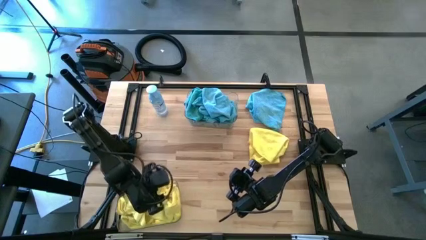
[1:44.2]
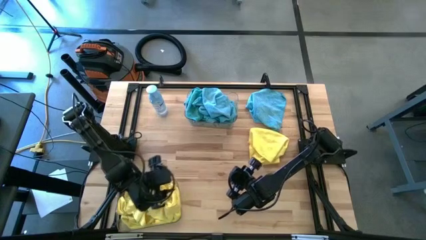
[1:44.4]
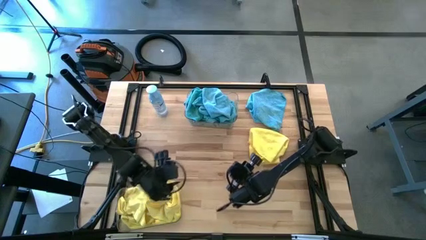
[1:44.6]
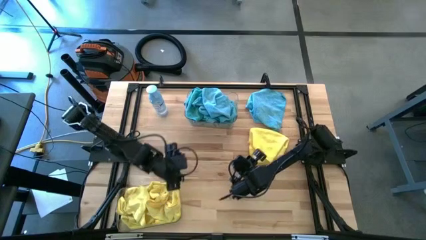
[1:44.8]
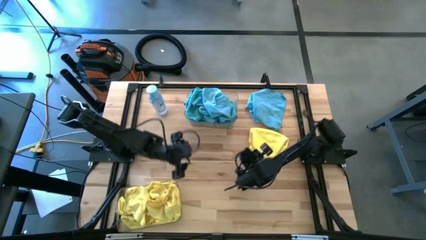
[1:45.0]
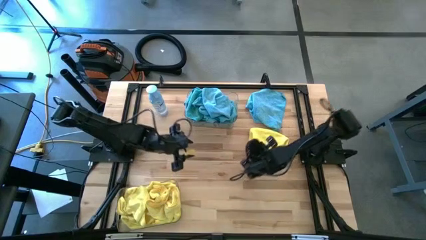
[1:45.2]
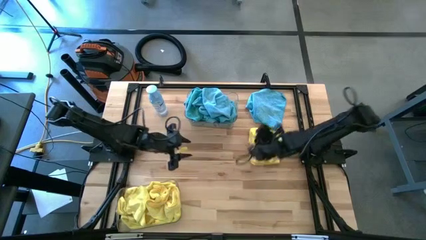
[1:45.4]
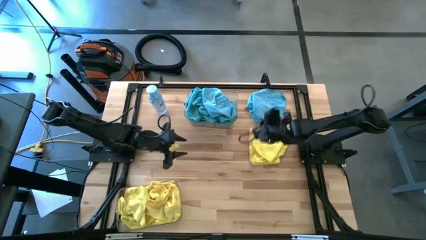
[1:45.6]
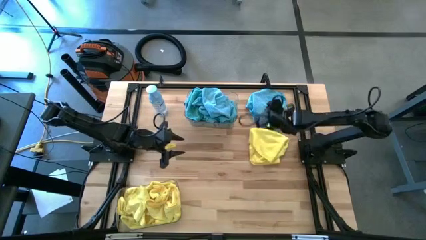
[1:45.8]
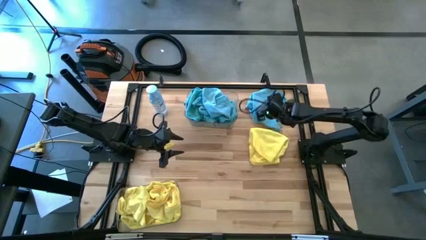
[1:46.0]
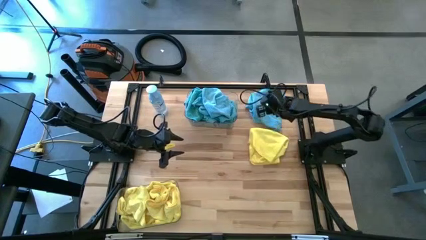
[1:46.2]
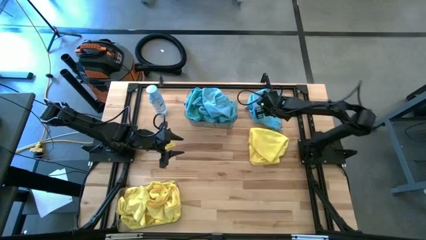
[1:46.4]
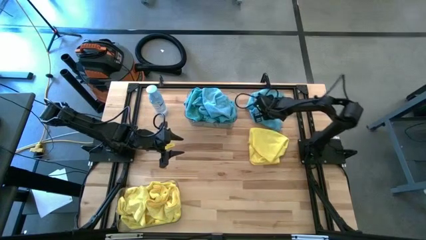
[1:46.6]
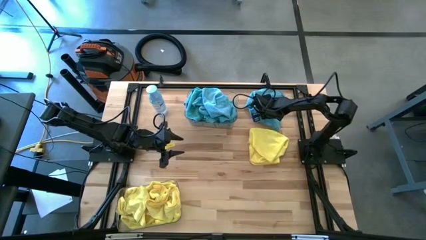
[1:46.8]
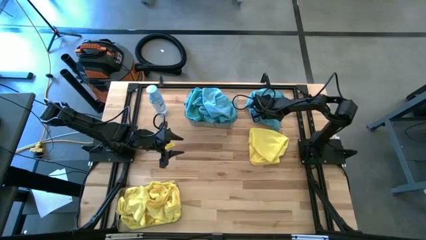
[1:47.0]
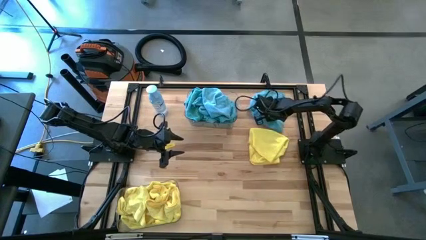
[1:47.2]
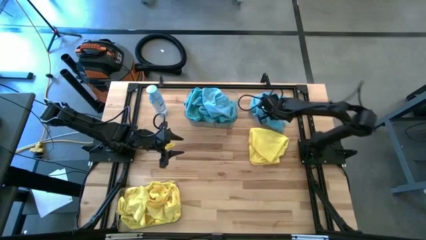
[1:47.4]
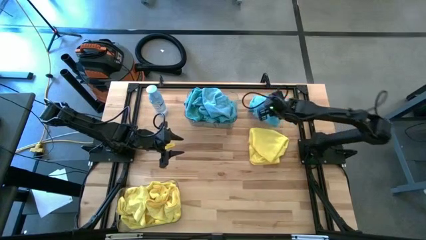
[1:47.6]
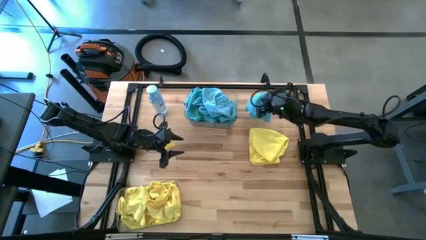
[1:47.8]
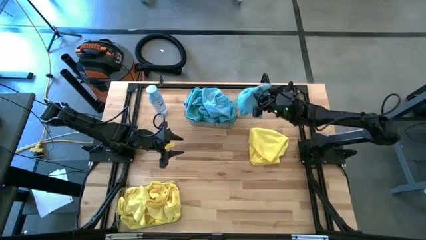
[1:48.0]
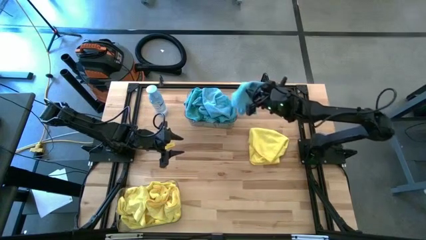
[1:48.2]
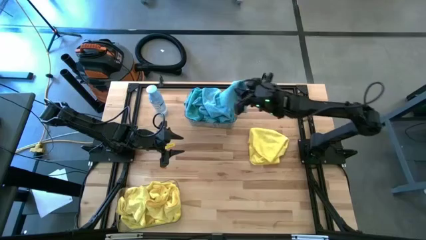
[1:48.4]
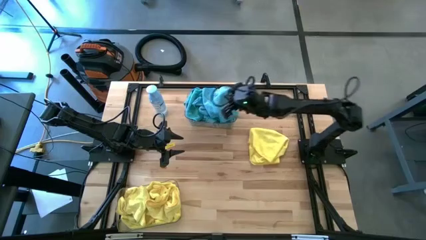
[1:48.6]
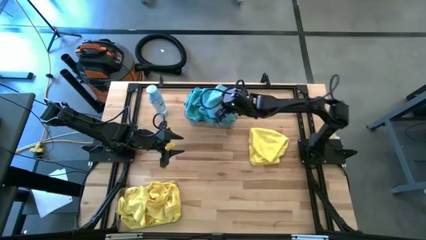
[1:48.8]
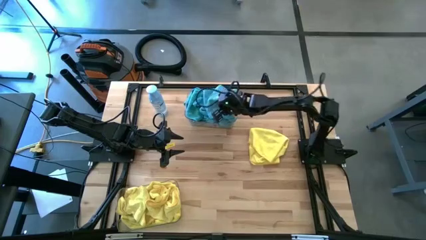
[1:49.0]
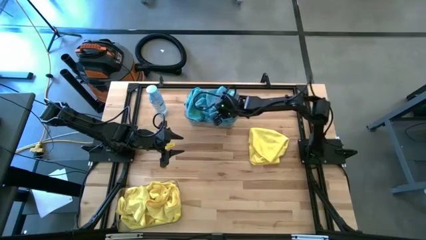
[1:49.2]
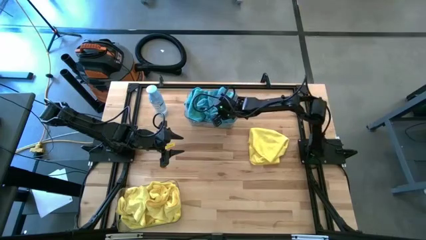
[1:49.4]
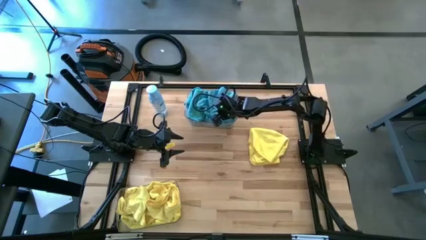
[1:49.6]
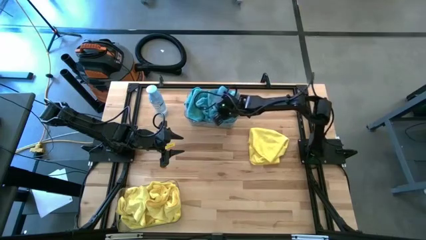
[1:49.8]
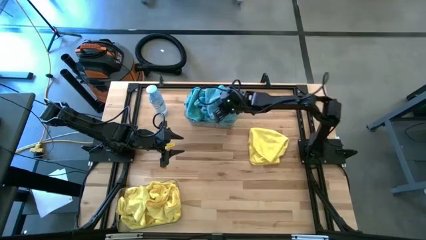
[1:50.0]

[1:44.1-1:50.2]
Task: Sort microfiber towel by color & place in baskets
Put the blue microfiber towel into the top transparent bin

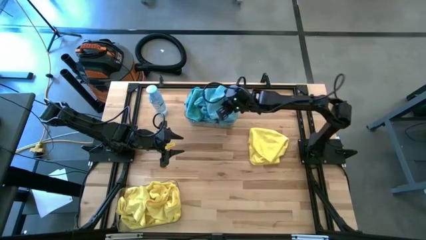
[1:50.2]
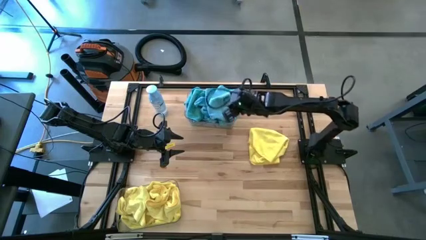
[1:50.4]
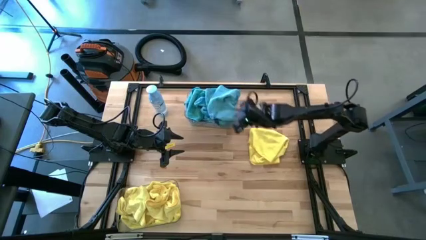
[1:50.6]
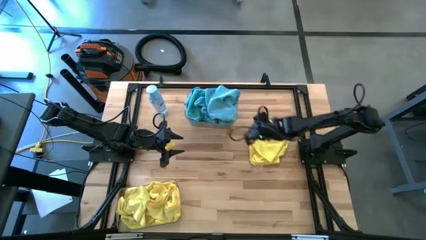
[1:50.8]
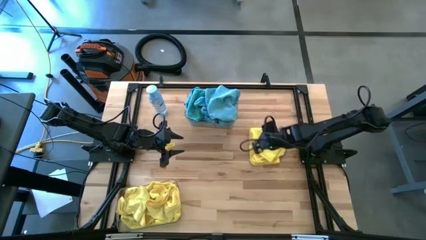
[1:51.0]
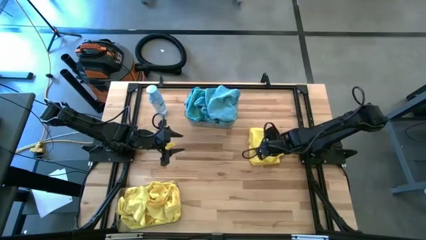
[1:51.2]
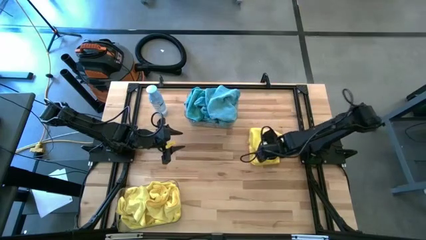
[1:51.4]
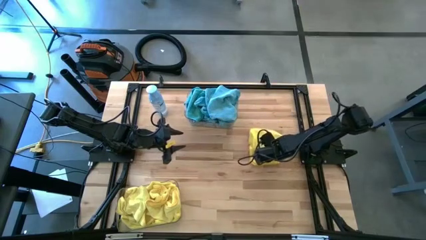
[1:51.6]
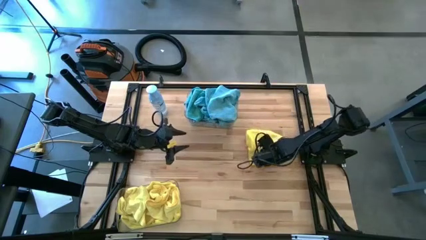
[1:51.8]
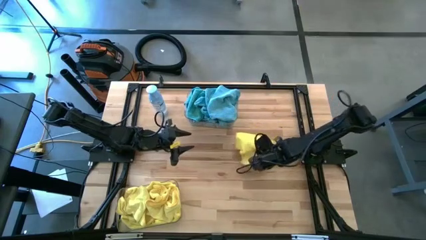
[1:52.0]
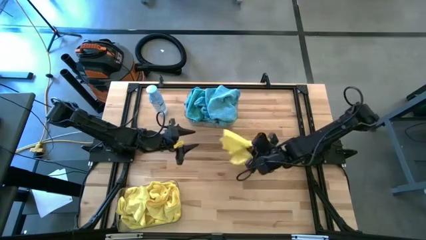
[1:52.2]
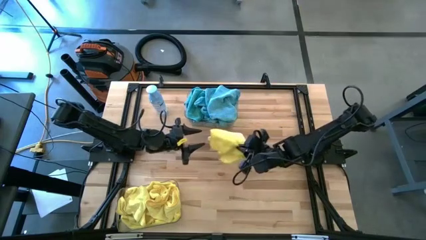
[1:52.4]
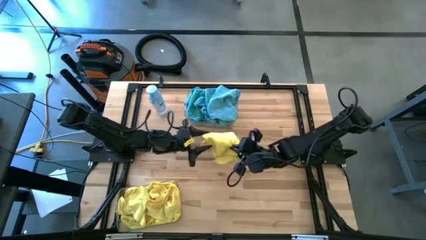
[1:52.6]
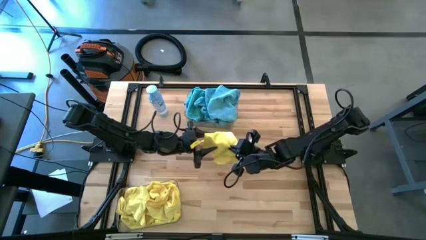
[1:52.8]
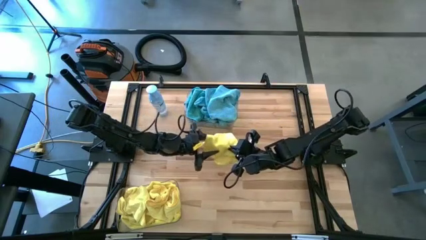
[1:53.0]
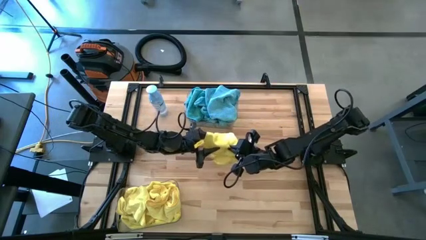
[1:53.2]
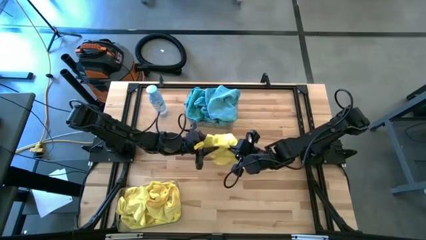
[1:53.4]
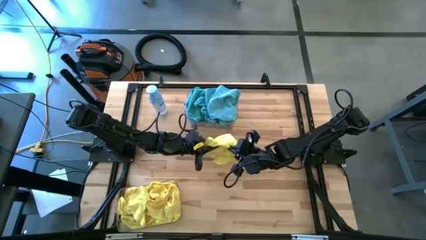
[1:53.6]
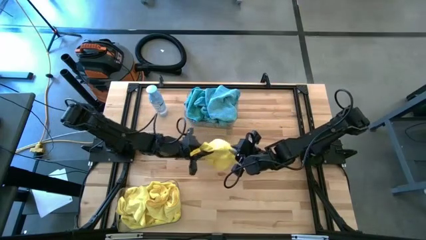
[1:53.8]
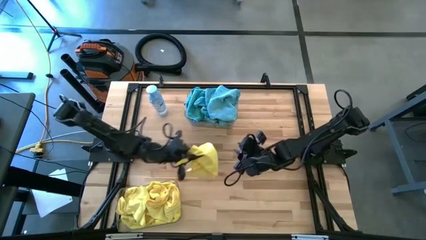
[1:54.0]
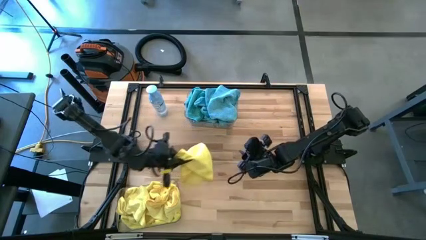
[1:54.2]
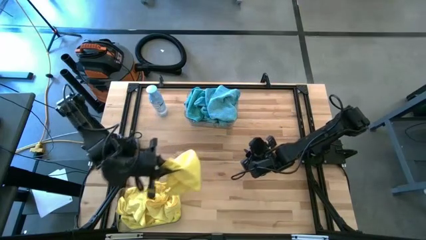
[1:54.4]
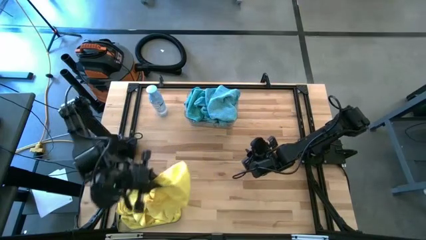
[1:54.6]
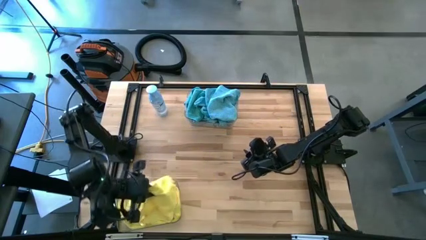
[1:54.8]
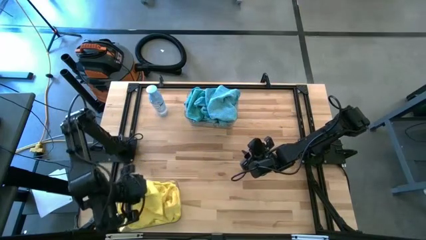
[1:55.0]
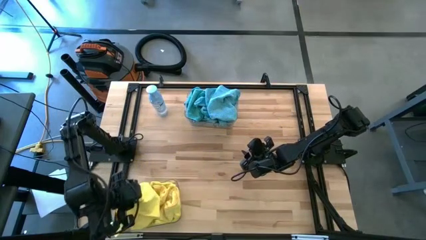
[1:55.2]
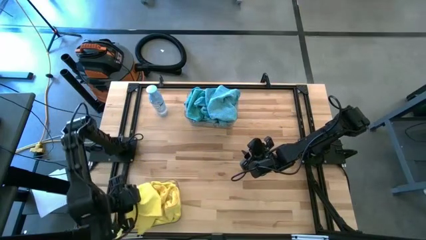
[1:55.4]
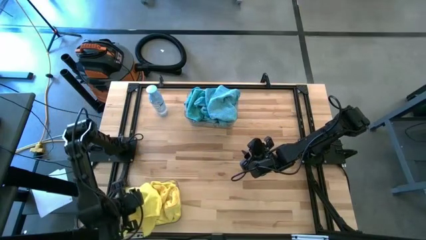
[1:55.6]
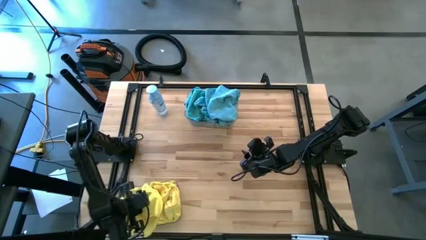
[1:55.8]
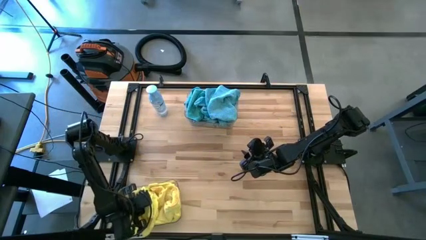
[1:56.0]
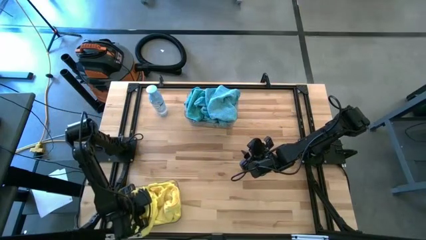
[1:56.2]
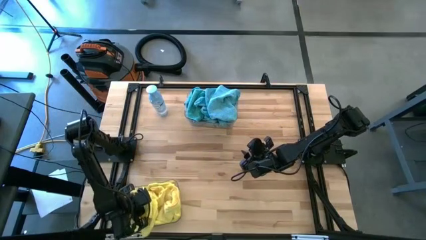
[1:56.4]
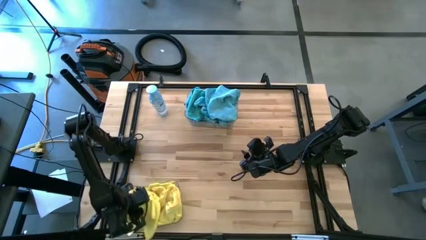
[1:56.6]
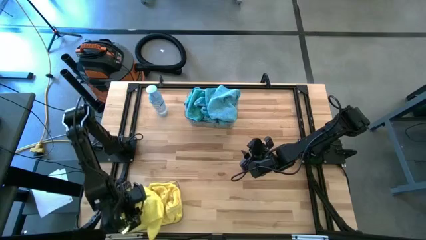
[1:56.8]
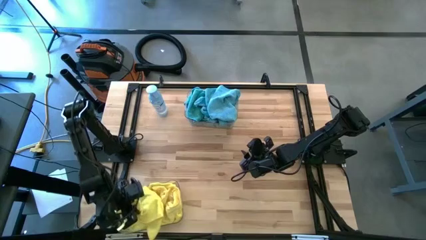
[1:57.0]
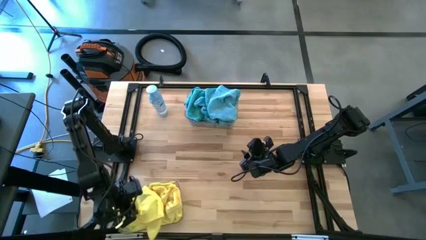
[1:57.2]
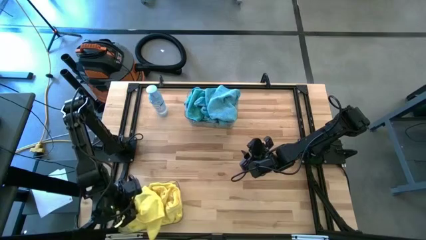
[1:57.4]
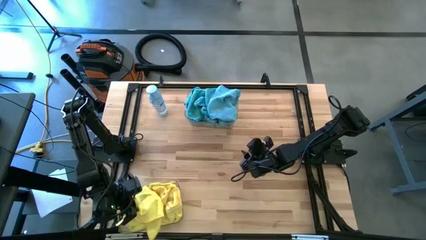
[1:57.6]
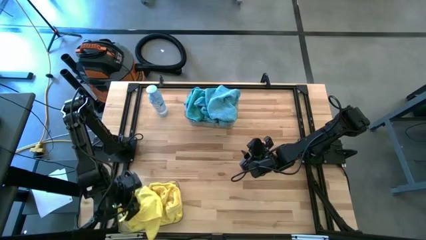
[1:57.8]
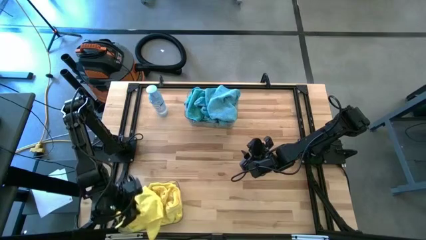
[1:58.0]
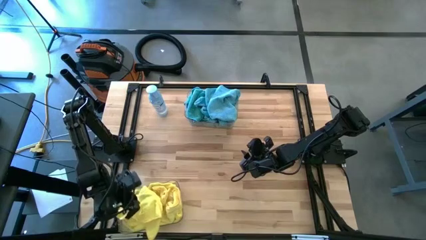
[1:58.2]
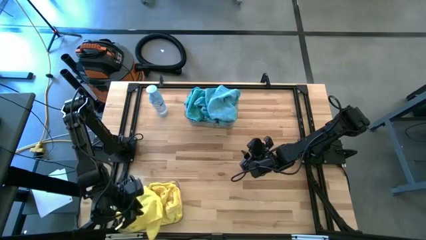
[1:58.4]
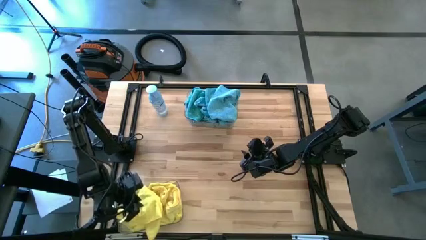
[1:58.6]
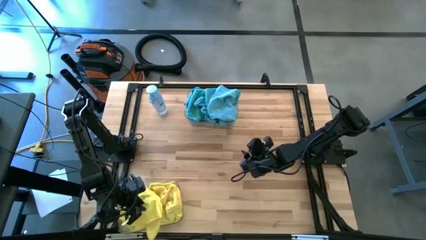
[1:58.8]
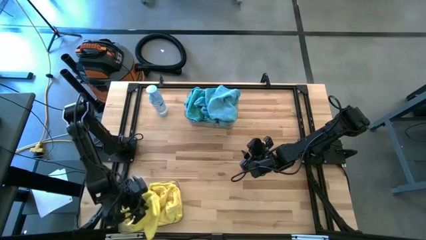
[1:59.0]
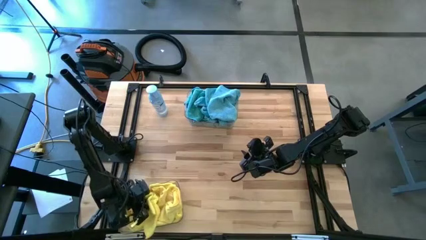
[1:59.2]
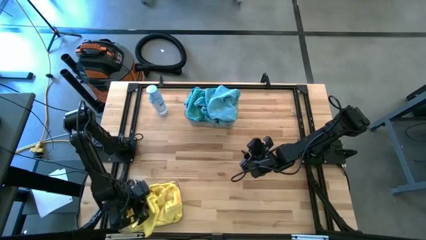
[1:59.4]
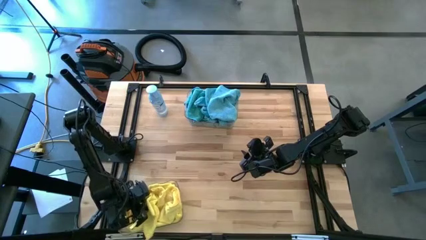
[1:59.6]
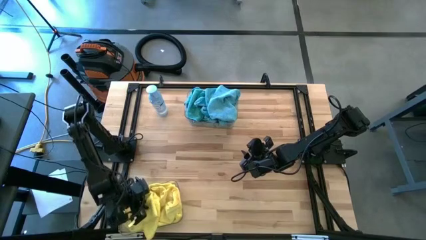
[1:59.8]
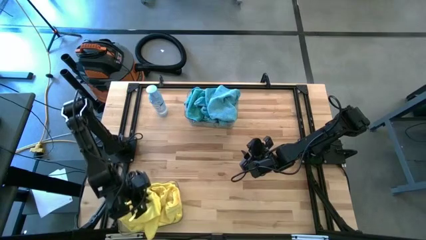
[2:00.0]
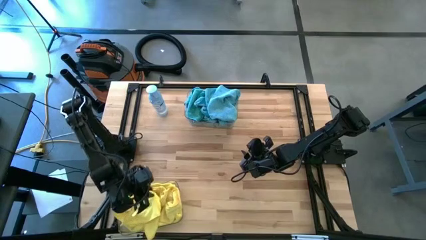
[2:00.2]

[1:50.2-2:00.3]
Put the yellow microfiber towel into the bottom transparent bin
